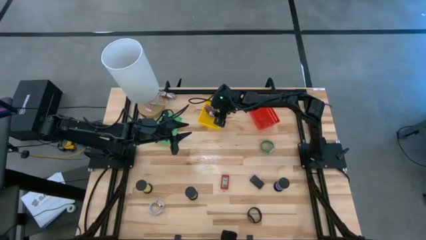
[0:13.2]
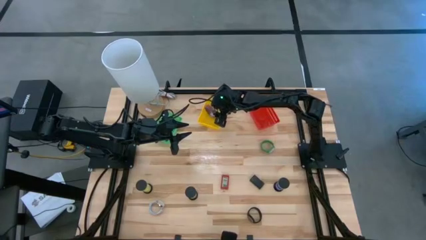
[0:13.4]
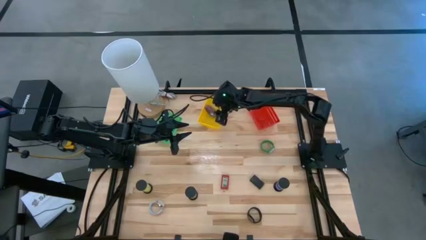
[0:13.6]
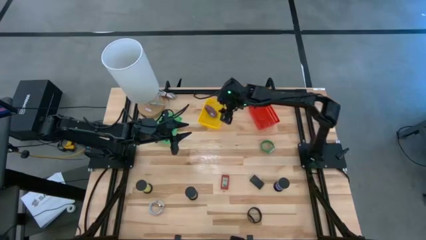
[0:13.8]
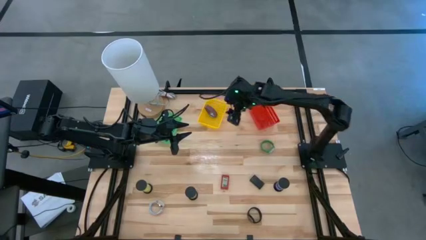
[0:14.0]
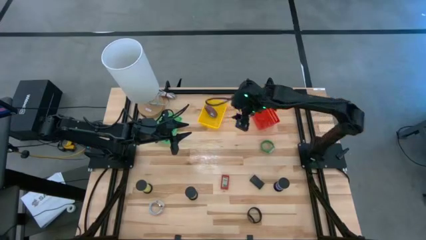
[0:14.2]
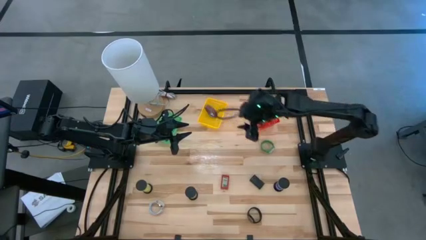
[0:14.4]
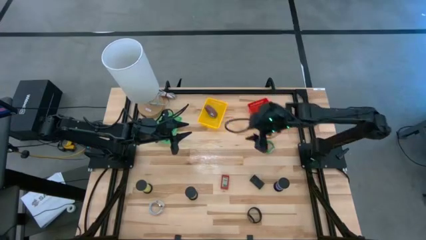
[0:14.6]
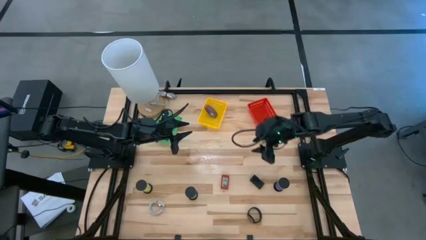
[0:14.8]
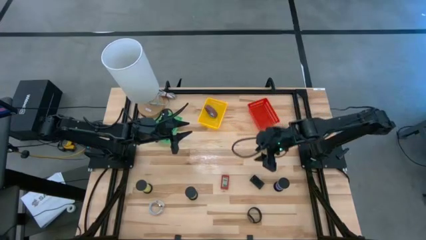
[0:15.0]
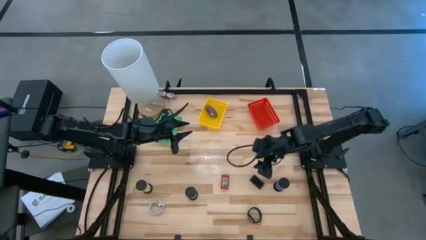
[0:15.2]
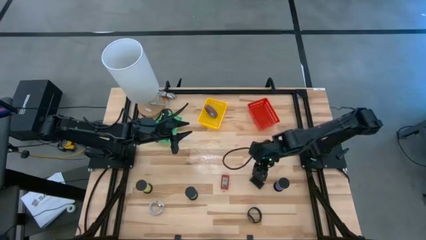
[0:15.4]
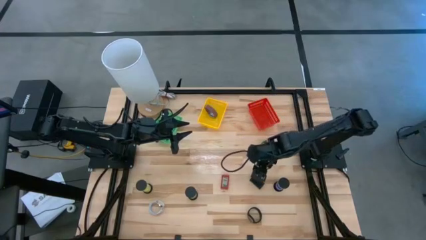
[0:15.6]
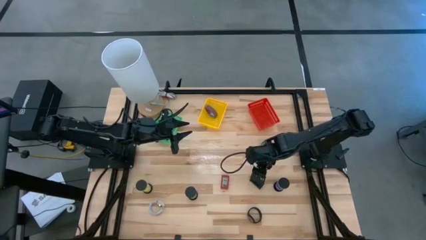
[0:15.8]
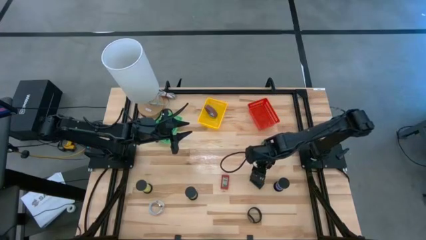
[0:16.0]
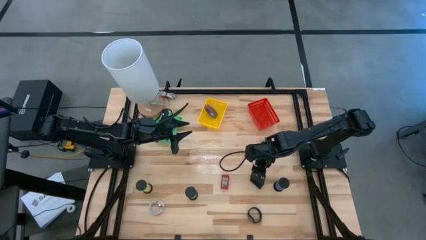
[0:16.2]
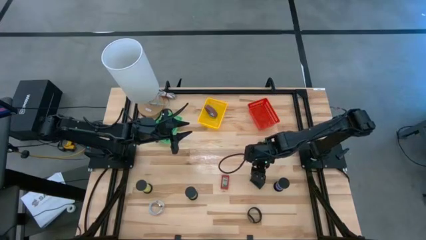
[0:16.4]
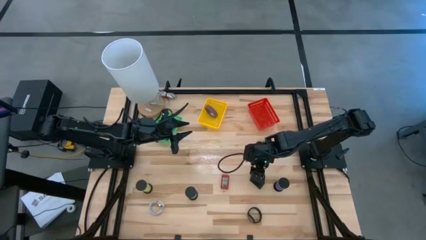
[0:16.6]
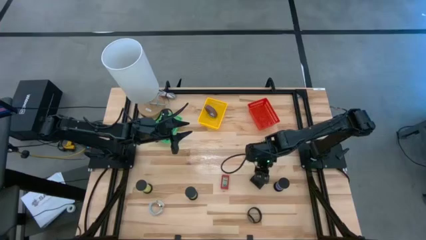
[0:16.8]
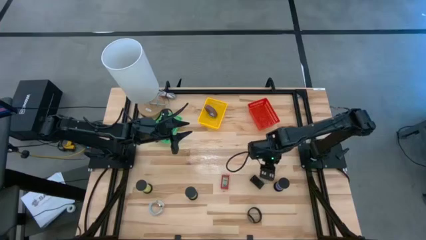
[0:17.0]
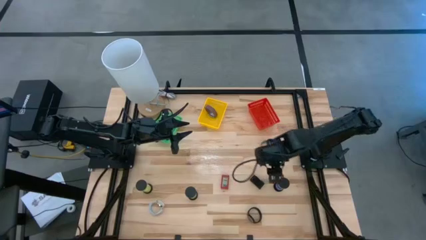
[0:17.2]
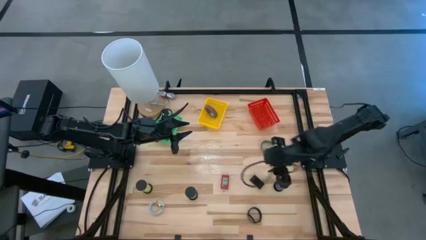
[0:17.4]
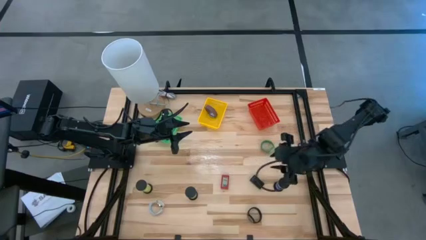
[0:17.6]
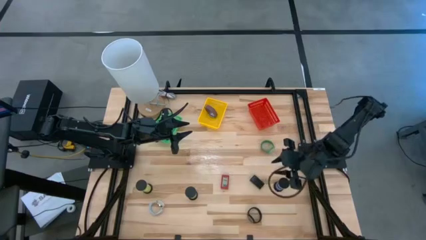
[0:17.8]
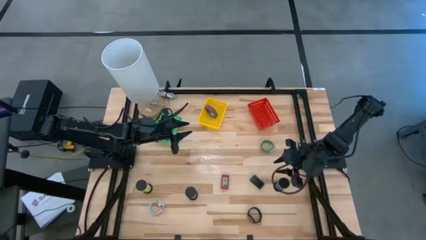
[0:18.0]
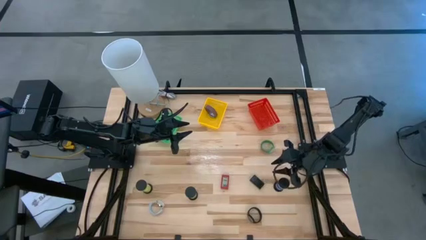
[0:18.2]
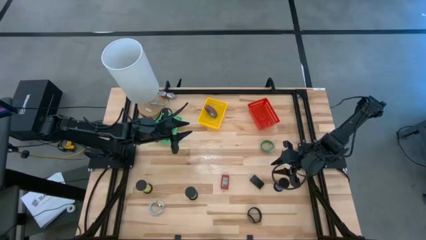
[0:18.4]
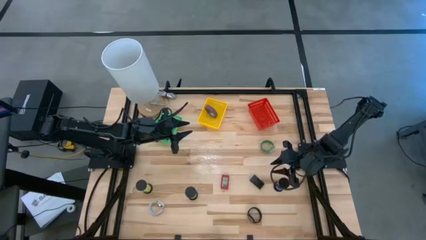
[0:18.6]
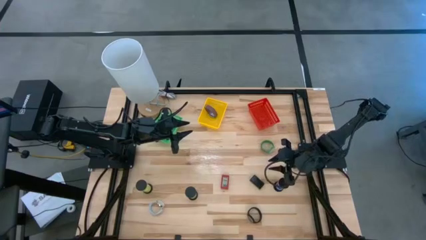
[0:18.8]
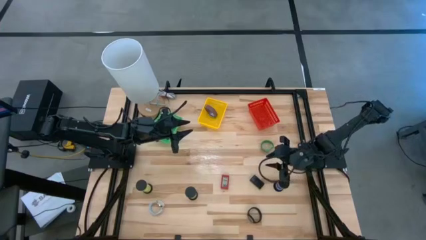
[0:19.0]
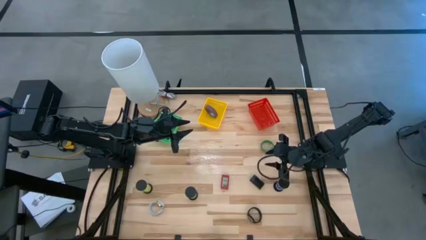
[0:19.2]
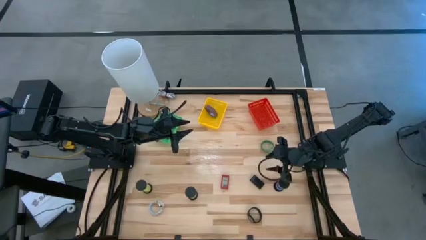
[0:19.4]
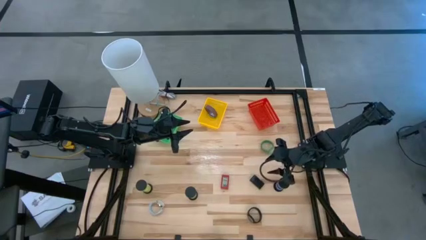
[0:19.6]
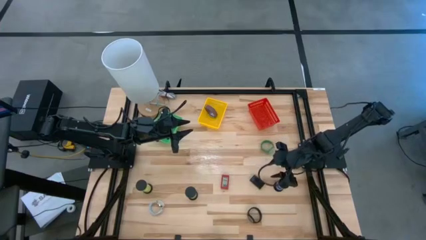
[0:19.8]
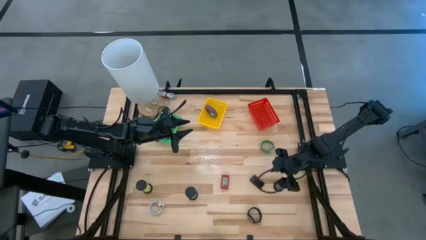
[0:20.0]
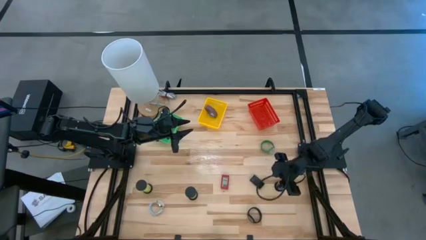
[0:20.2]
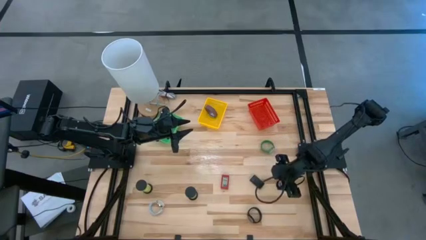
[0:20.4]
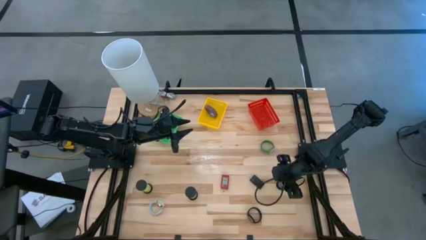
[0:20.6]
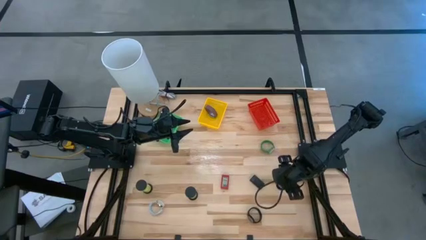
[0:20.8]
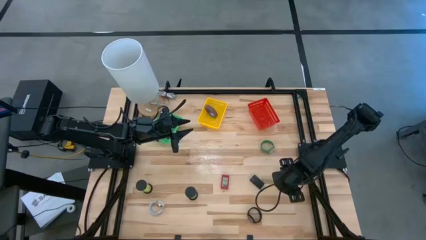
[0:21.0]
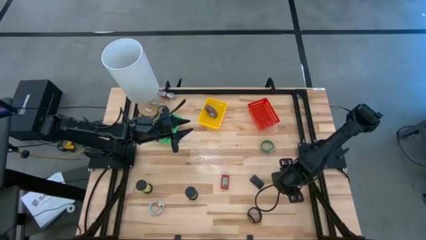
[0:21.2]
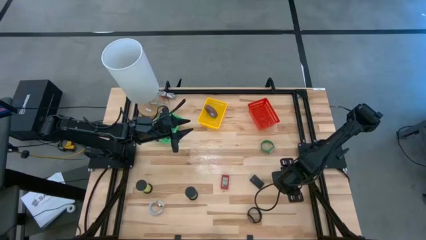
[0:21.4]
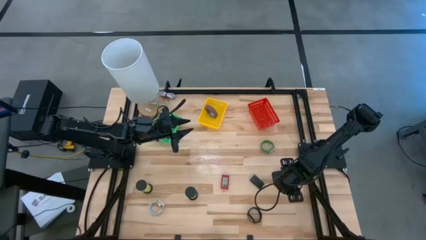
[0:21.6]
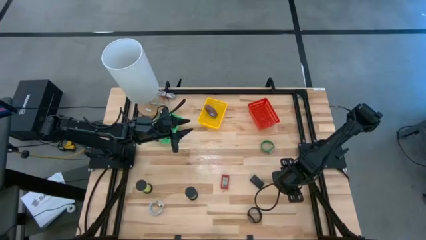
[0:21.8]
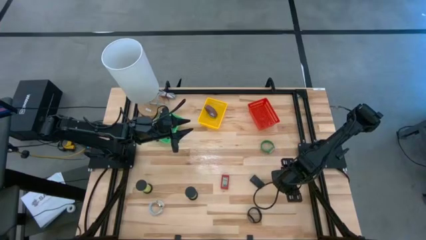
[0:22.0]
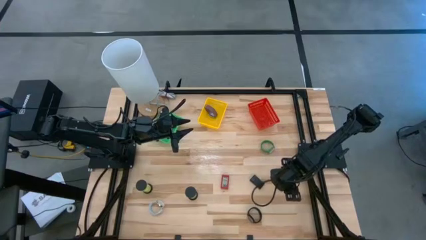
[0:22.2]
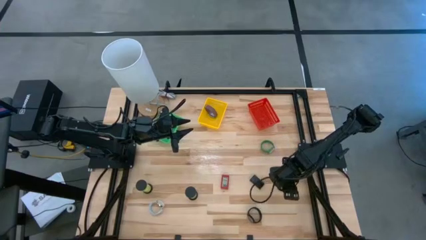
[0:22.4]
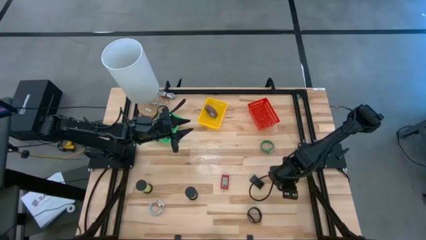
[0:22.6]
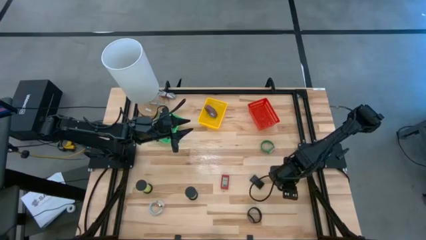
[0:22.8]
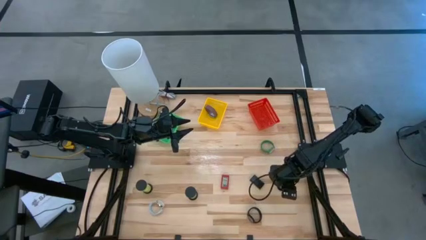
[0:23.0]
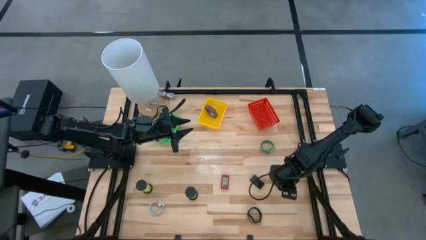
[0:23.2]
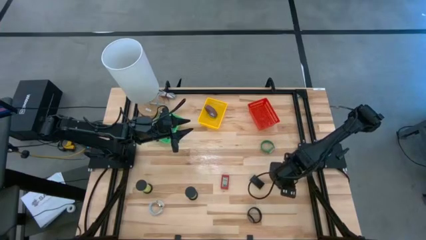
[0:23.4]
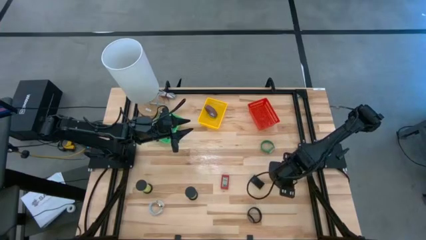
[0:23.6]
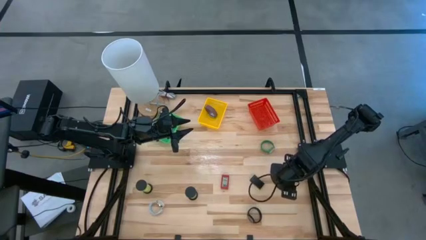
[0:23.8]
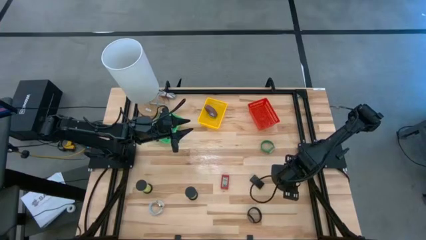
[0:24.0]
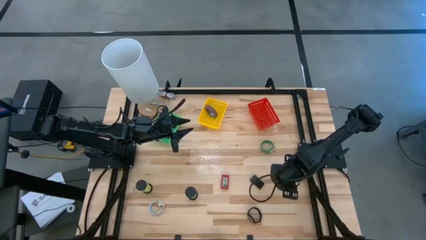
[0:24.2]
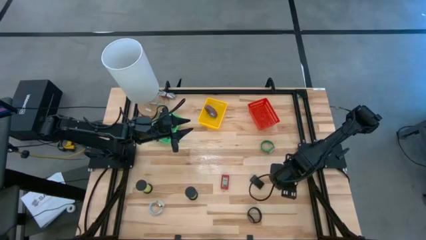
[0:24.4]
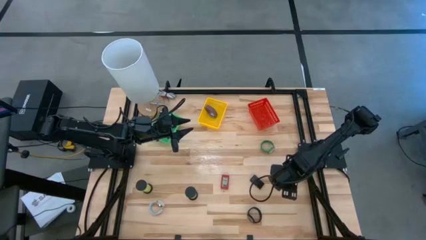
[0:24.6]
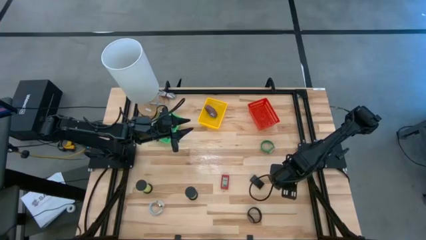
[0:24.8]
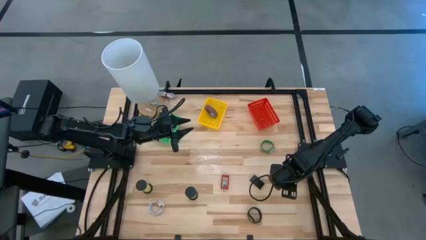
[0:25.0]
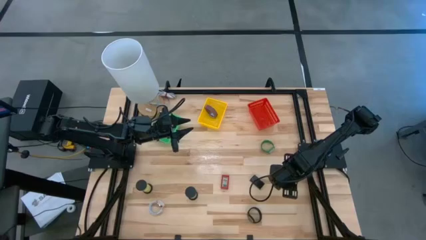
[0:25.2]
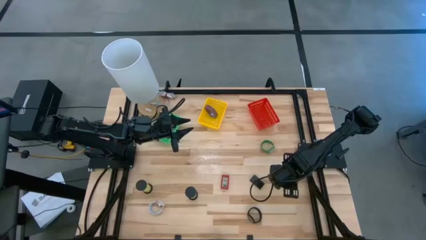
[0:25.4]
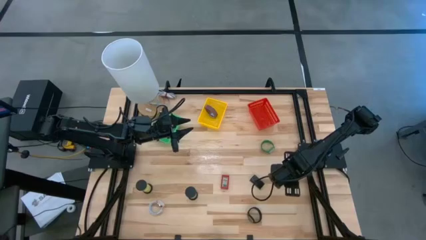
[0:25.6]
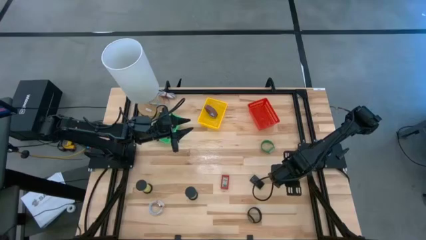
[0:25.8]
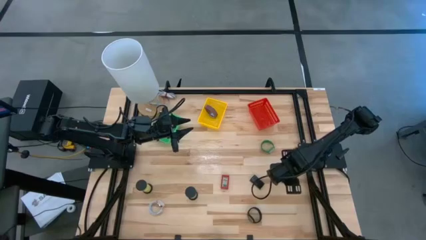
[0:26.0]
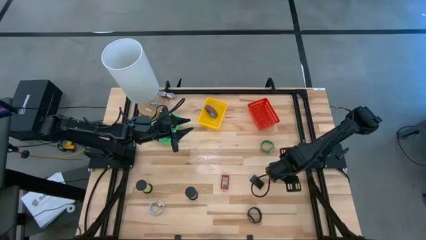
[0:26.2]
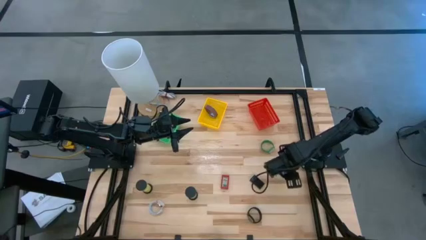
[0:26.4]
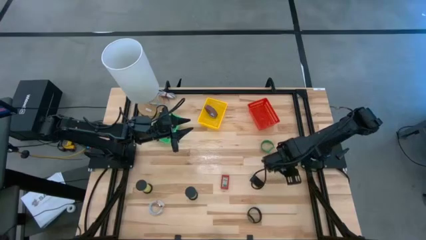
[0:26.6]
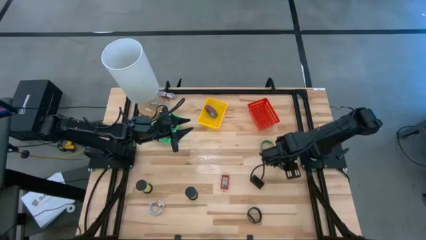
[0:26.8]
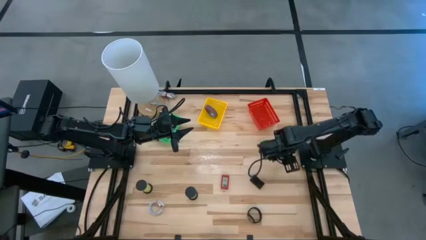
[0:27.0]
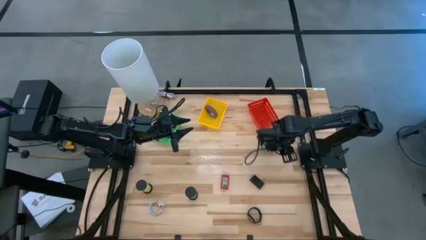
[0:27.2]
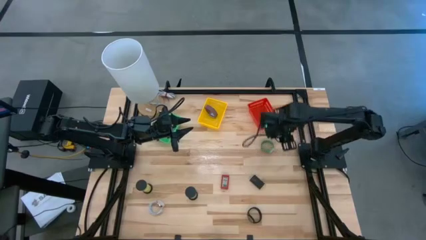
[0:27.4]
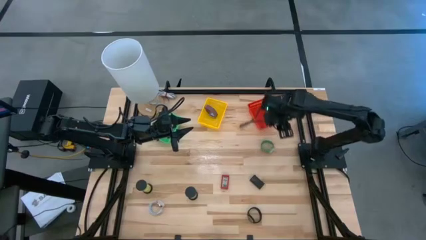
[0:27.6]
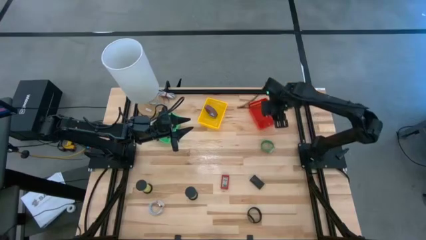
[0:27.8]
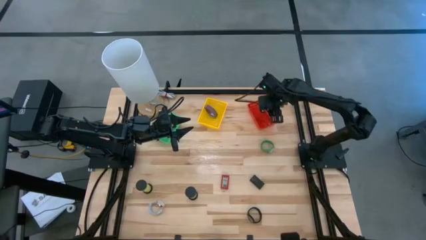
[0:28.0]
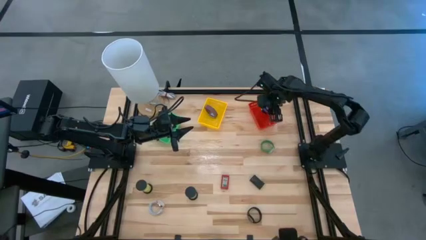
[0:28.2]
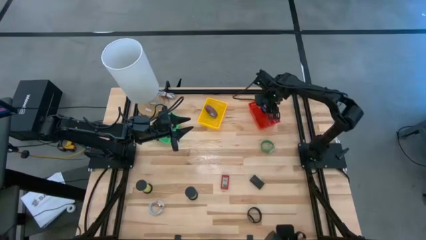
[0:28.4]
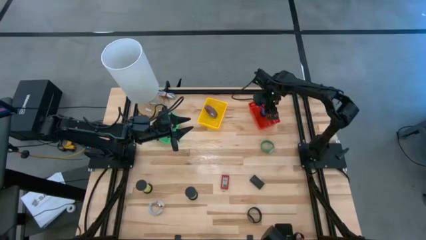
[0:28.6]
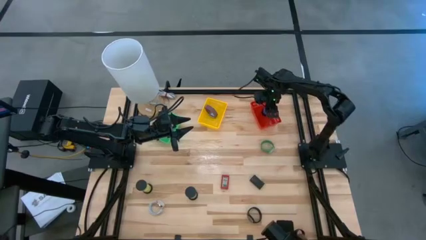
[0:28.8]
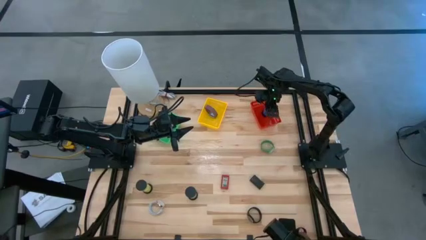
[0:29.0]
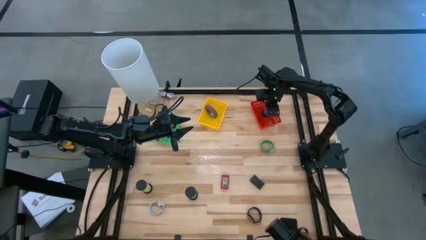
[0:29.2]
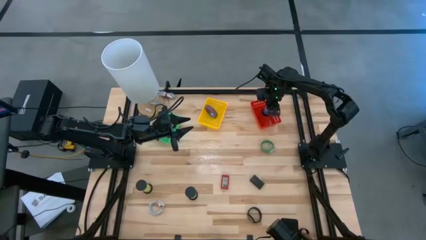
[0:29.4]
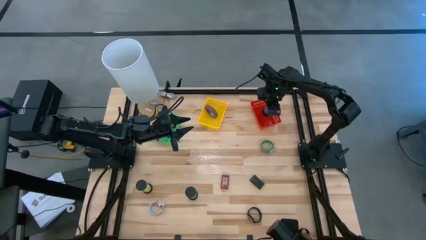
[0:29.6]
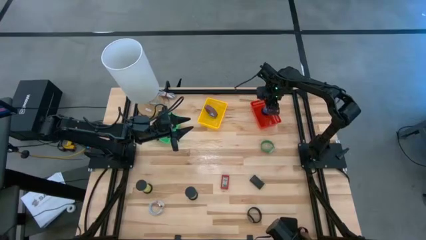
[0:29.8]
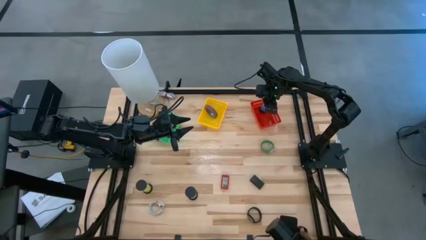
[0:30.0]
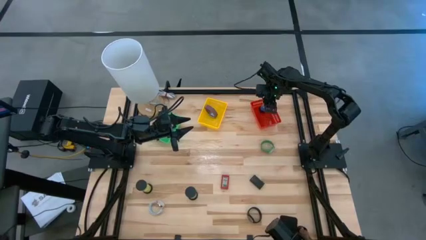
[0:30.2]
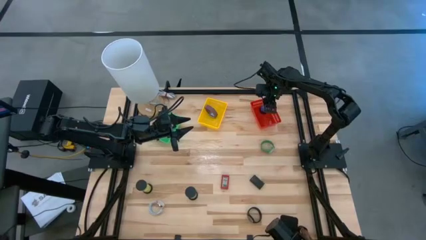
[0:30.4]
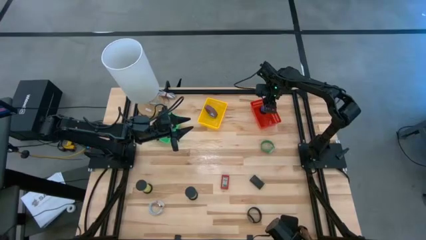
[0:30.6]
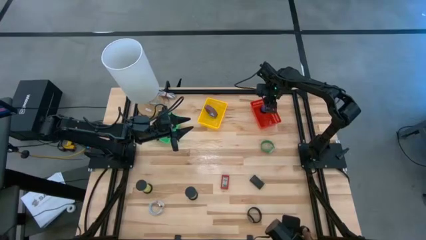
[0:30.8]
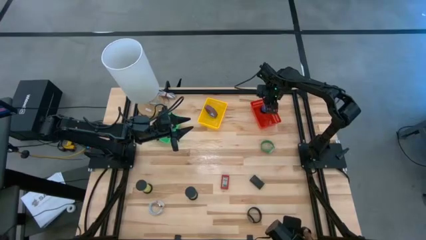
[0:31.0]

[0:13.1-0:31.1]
Task: Pick & Place Office items
Put the blue hourglass into the red bin
